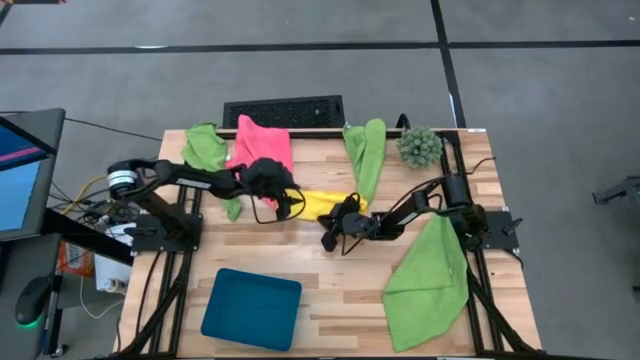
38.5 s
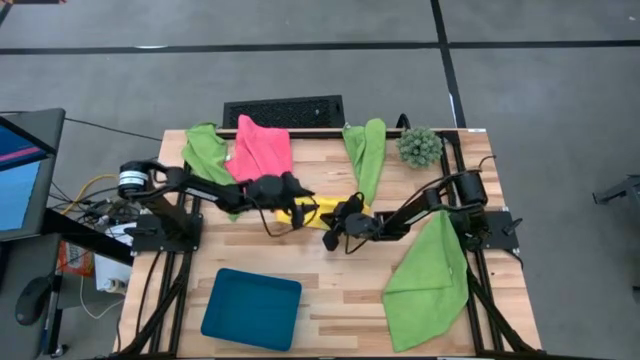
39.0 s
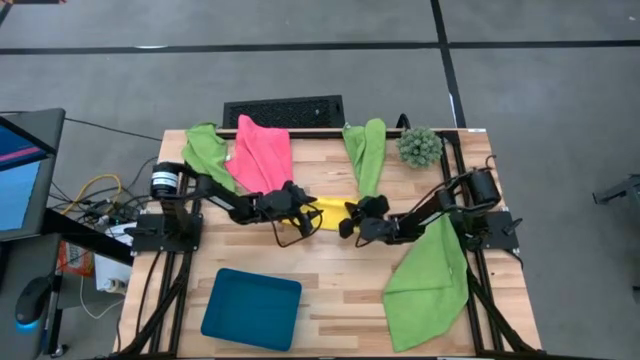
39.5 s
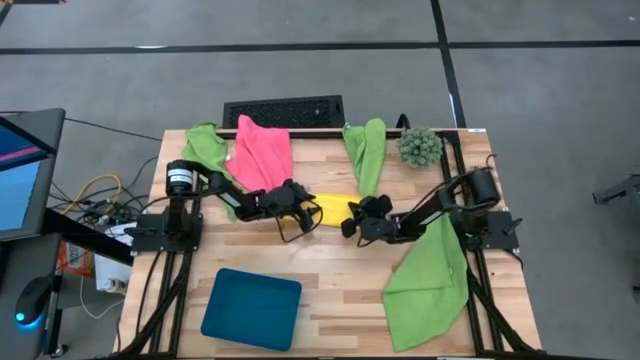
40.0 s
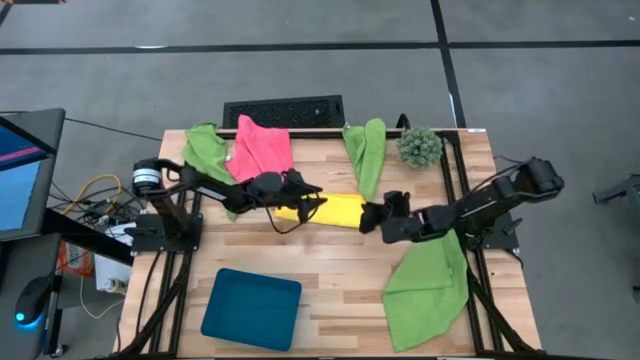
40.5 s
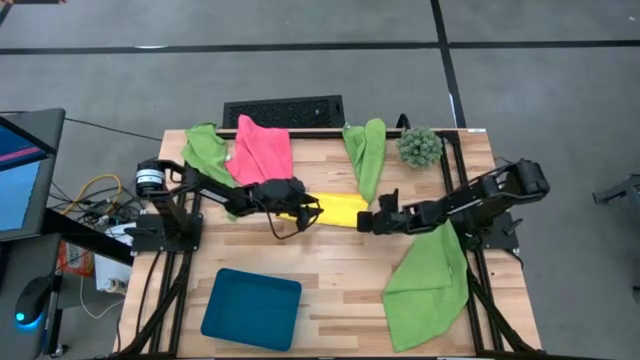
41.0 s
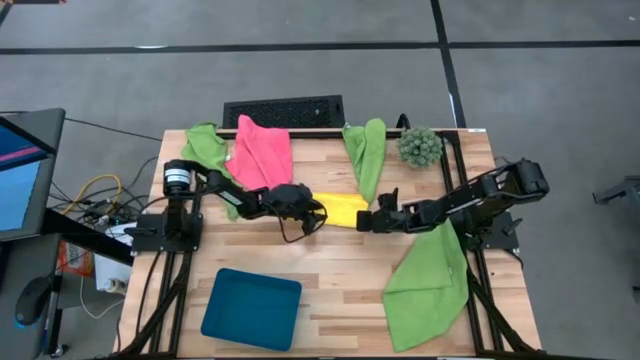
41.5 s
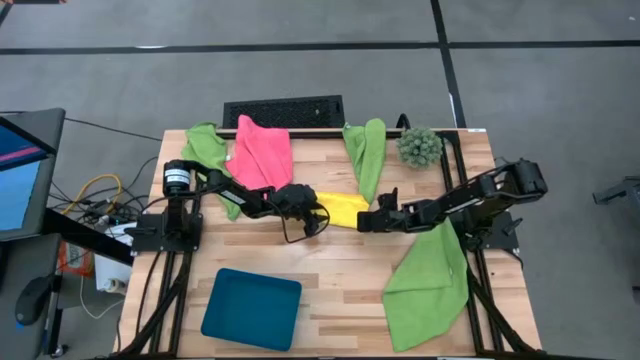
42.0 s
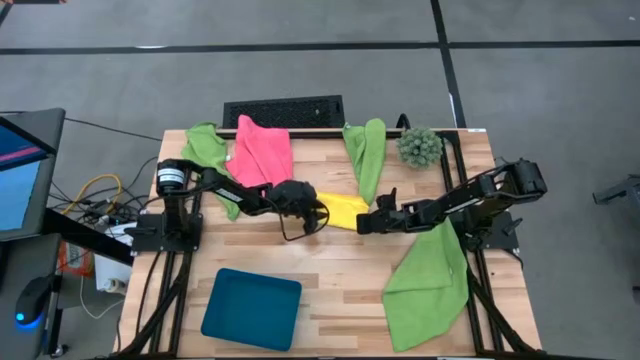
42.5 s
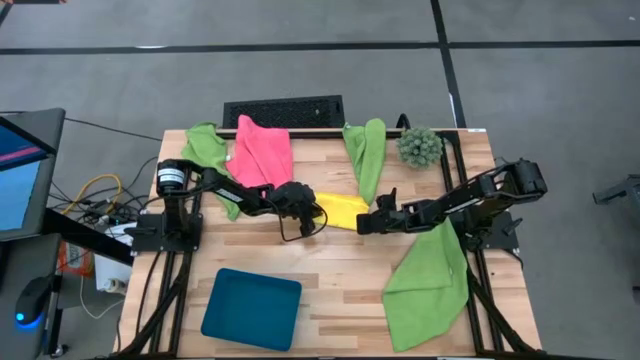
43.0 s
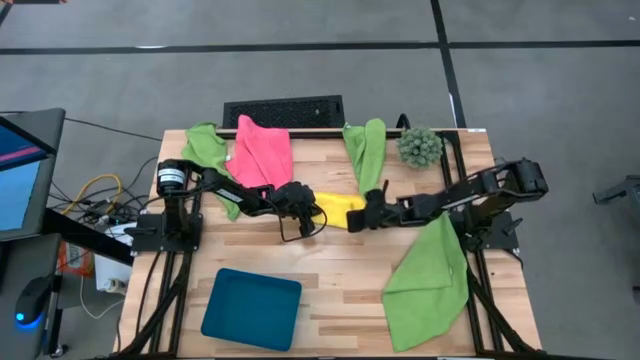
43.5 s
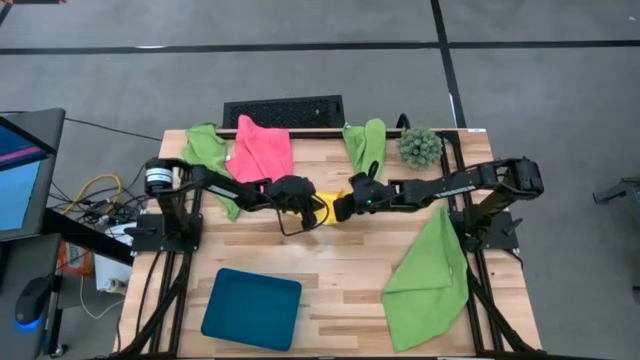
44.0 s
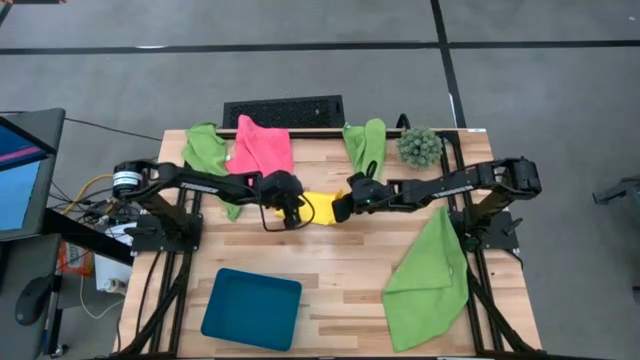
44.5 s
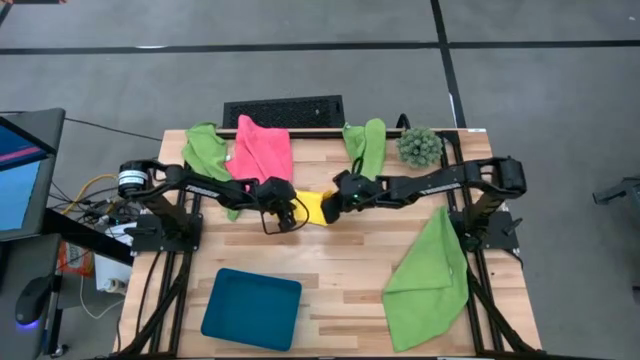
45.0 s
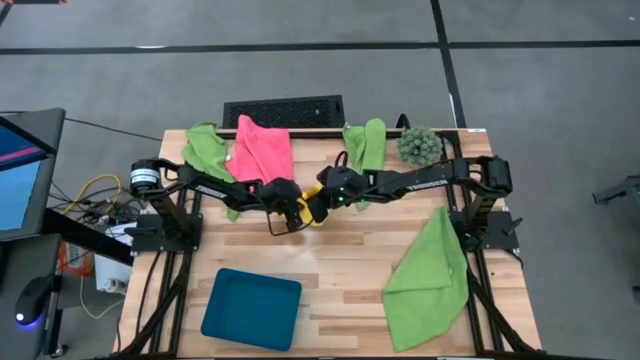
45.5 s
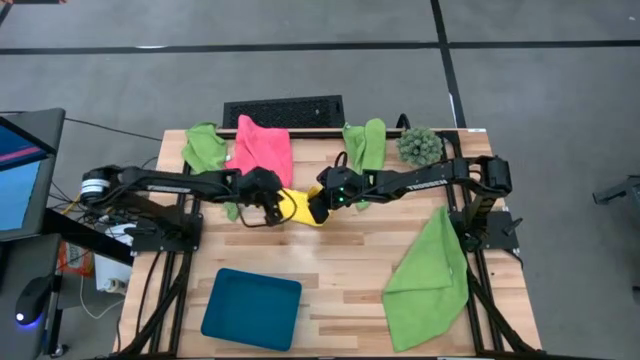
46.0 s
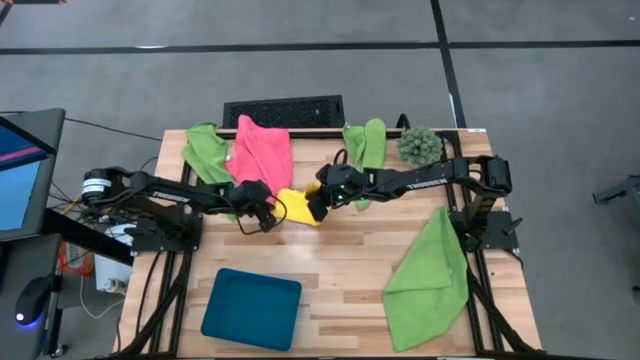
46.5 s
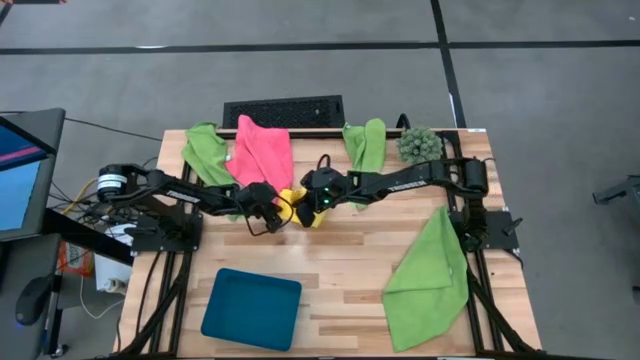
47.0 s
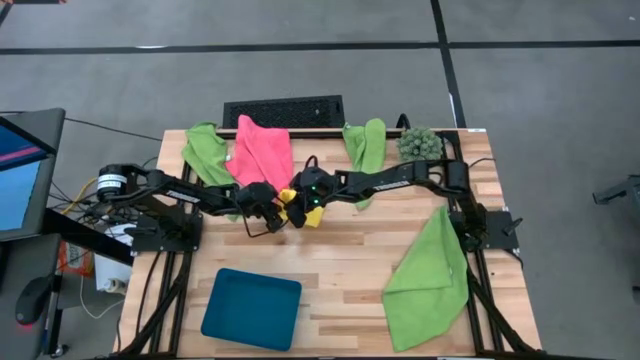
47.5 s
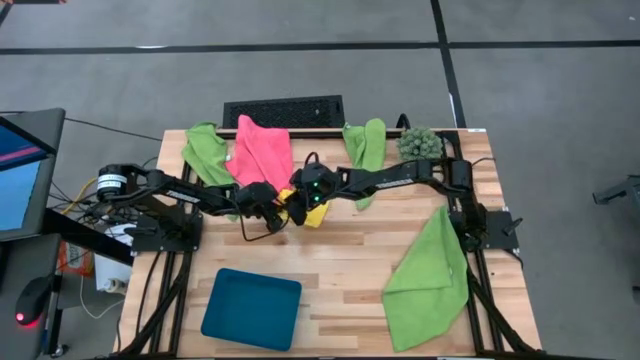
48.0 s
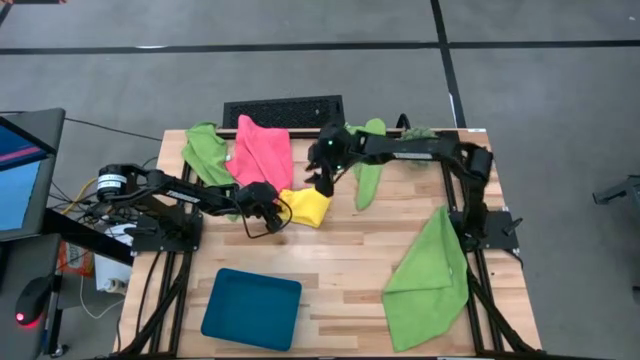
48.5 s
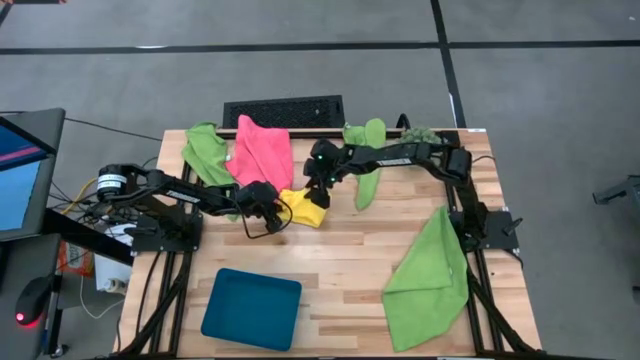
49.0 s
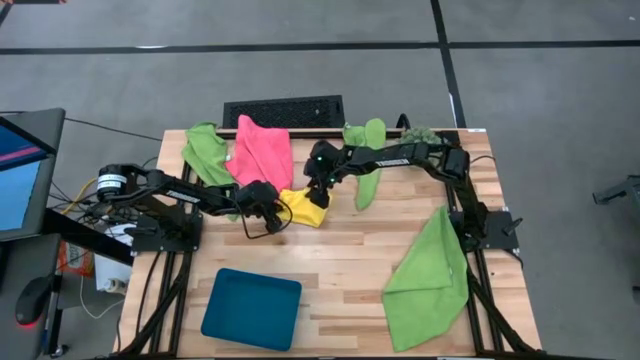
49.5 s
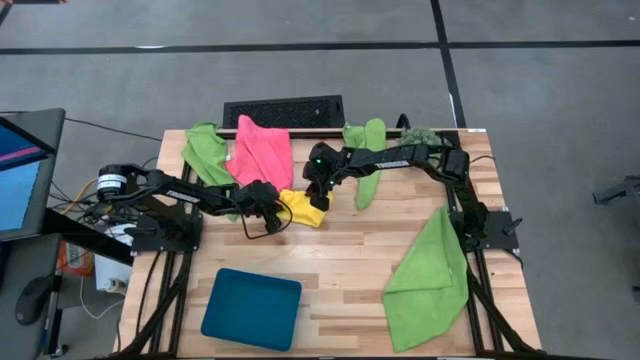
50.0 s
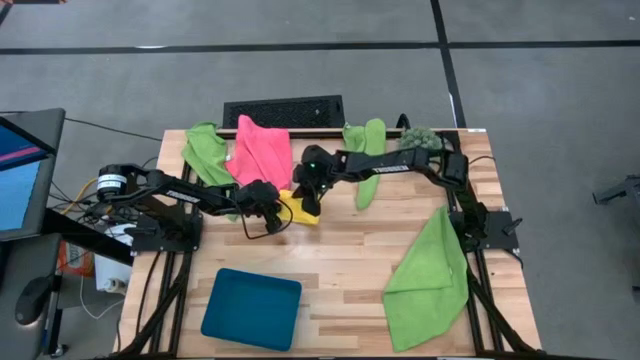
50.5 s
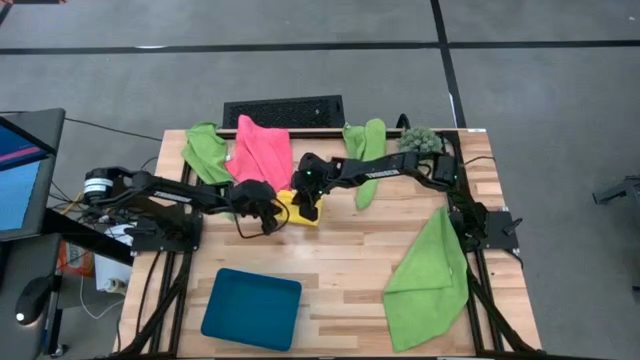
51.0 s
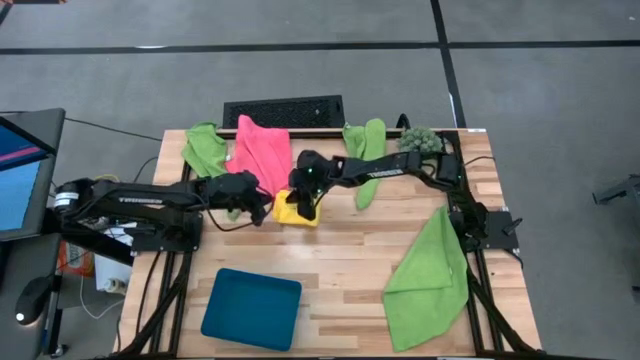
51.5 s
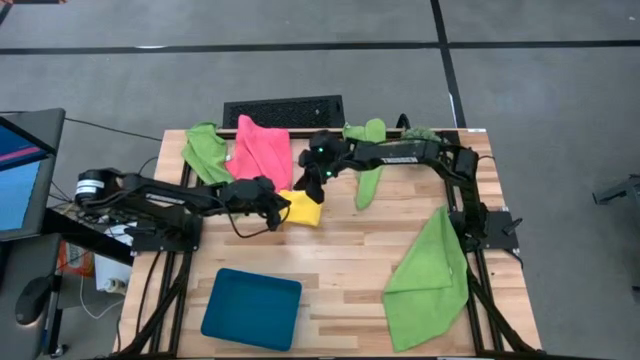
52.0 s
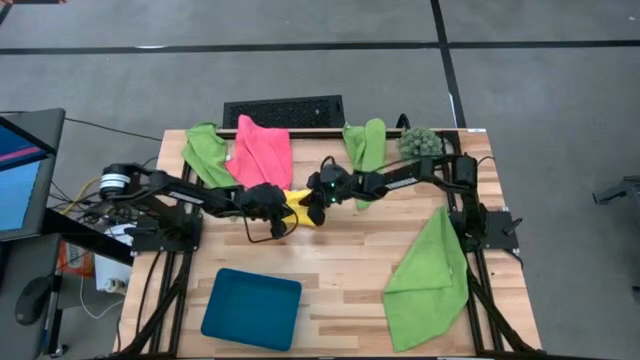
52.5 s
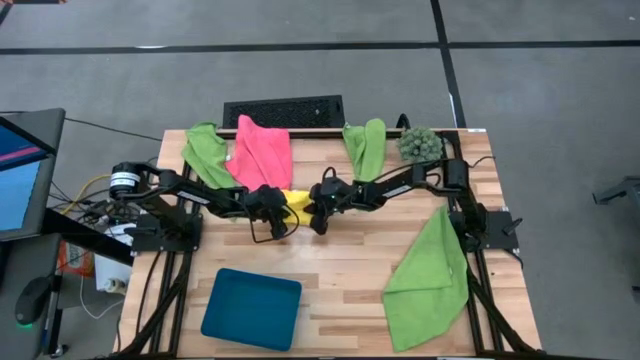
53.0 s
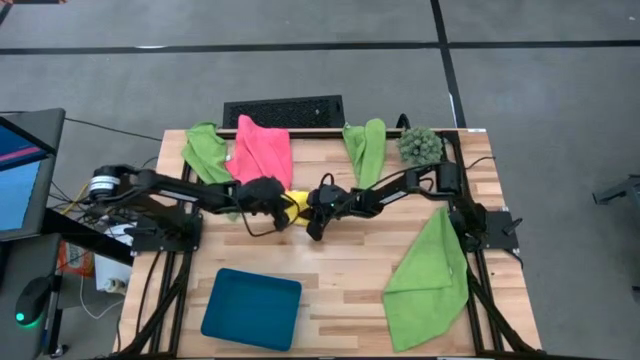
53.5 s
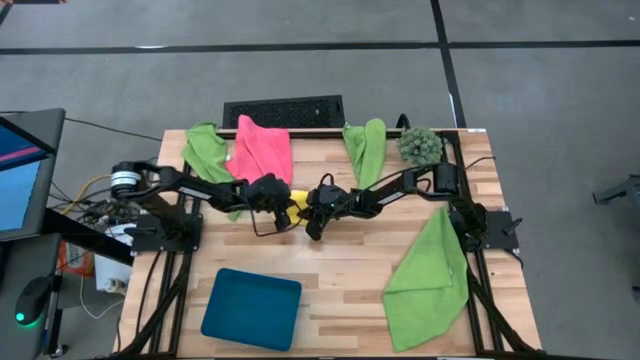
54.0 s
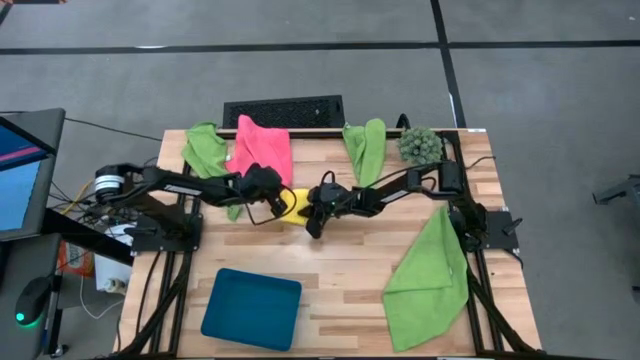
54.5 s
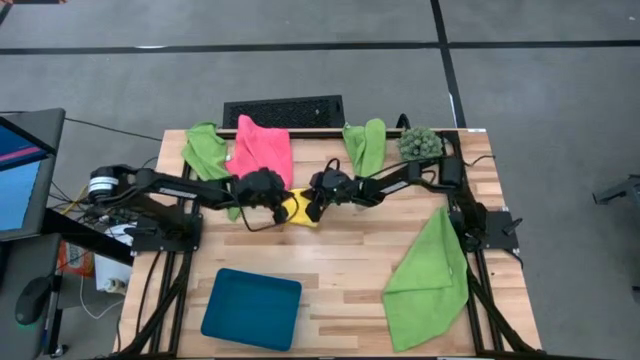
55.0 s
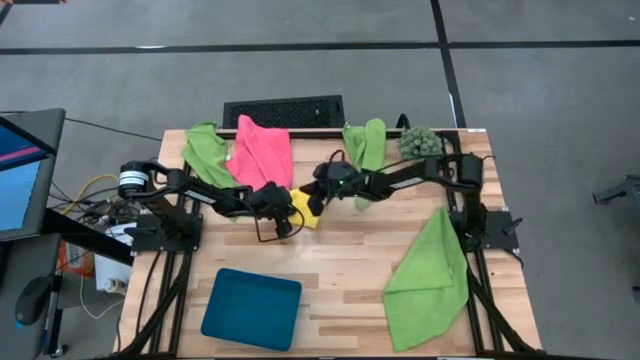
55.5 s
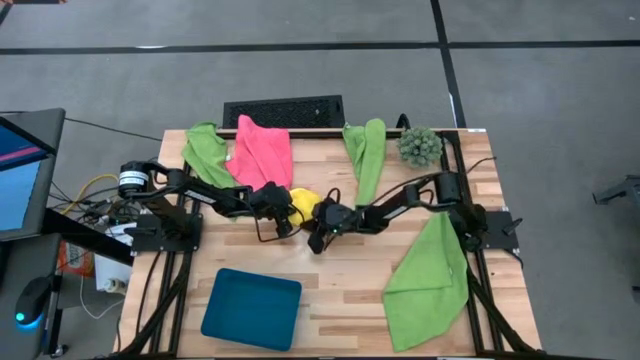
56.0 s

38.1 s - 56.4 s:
Task: Fold microfiber towels
Fold the yellow microfiber towel

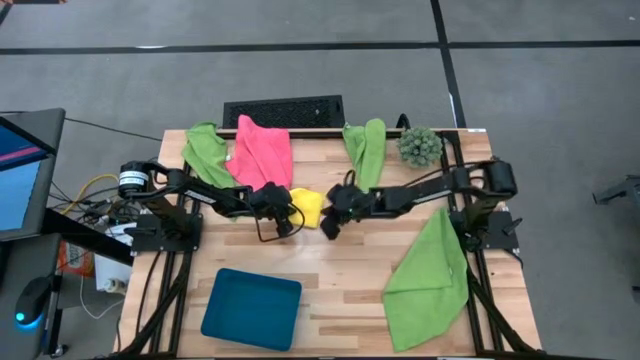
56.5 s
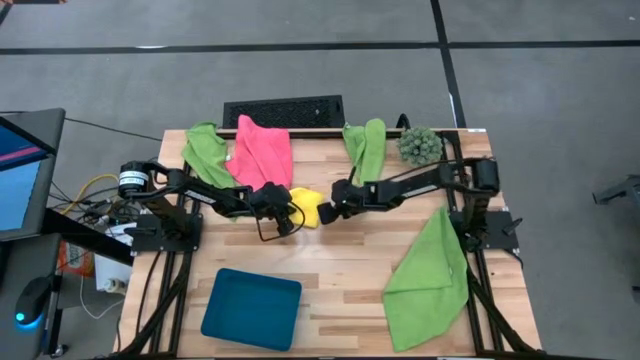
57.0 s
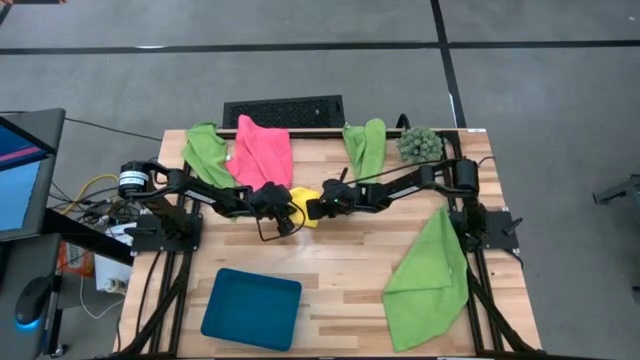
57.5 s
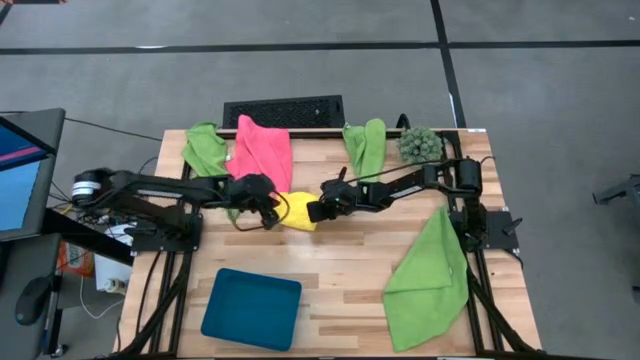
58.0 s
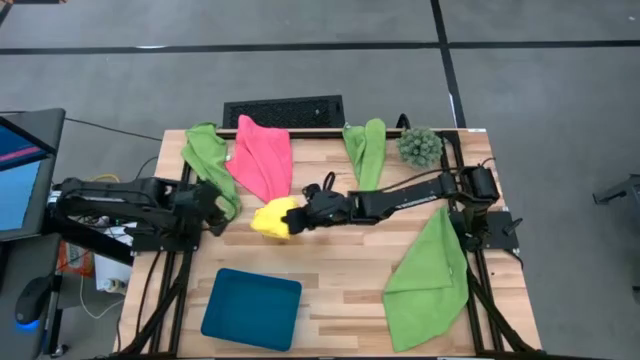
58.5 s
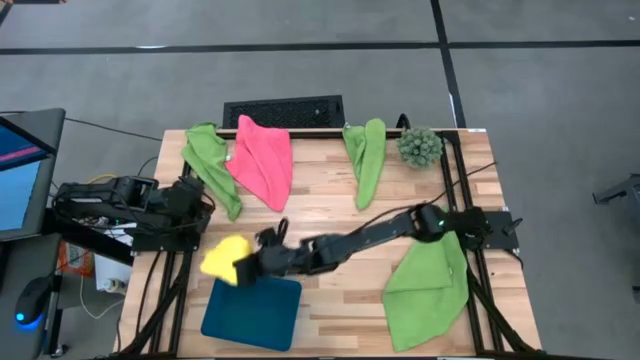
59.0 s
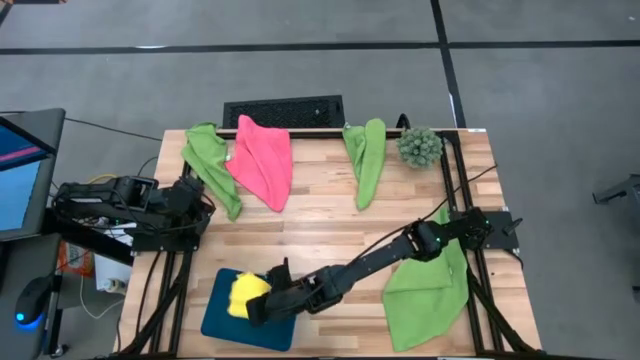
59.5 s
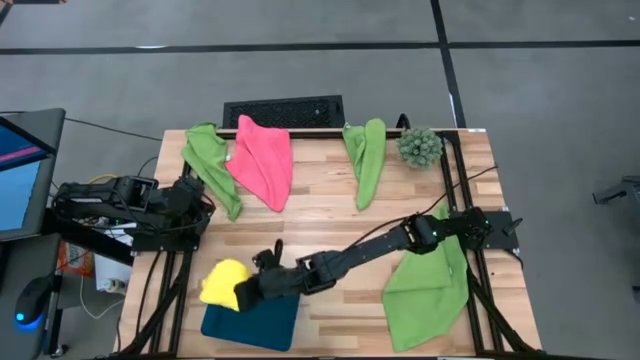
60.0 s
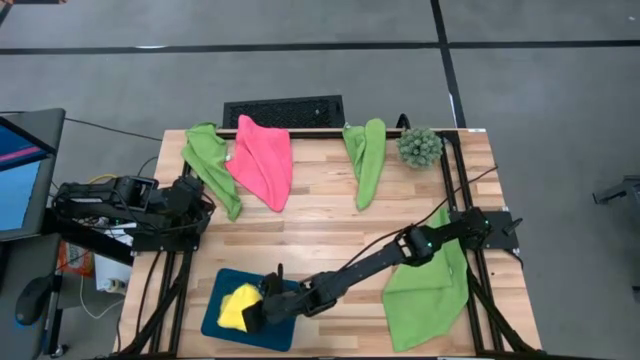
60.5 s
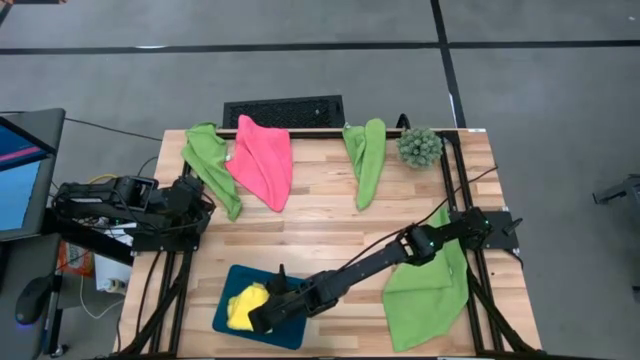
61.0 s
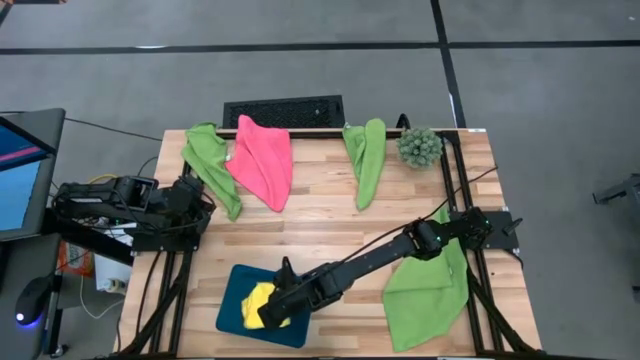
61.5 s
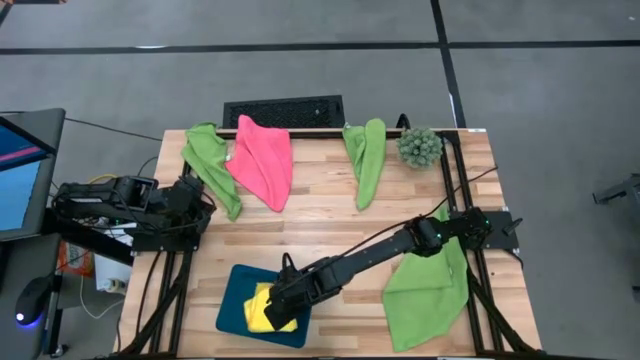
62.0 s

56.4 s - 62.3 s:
Put the yellow microfiber cloth into the blue bin
